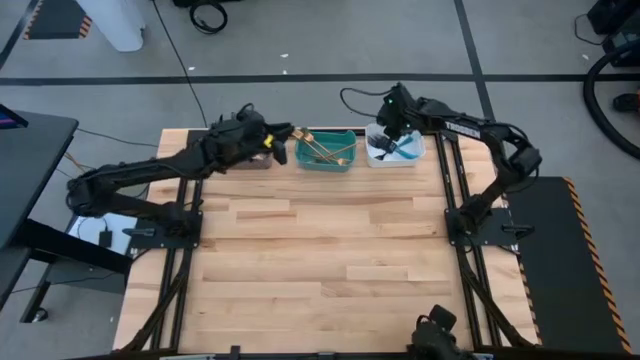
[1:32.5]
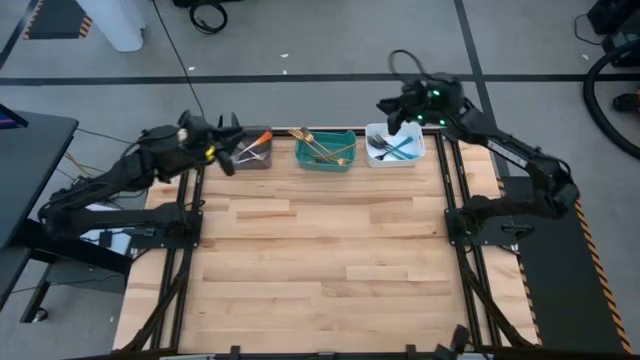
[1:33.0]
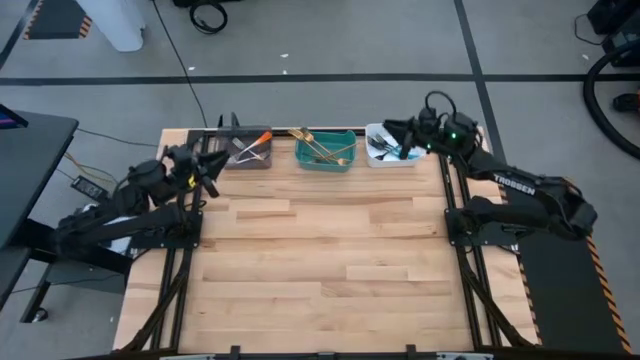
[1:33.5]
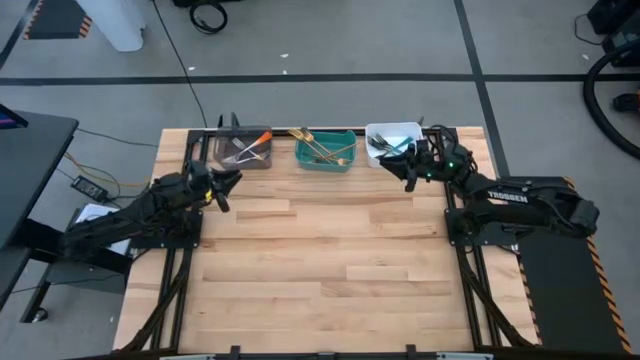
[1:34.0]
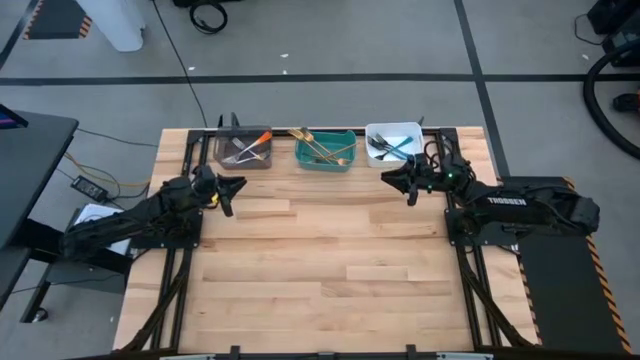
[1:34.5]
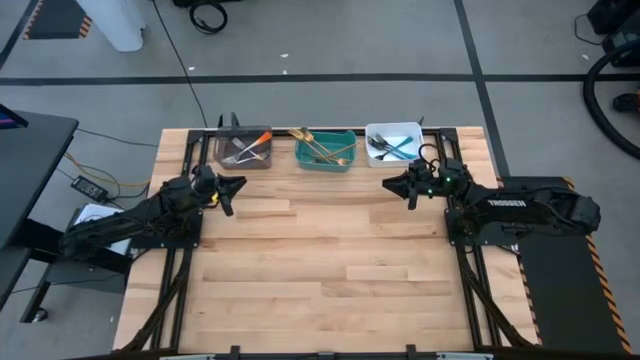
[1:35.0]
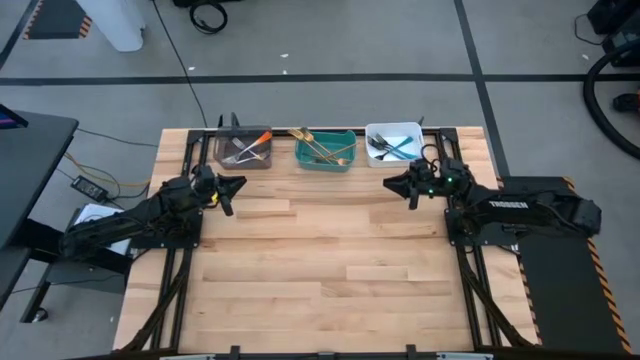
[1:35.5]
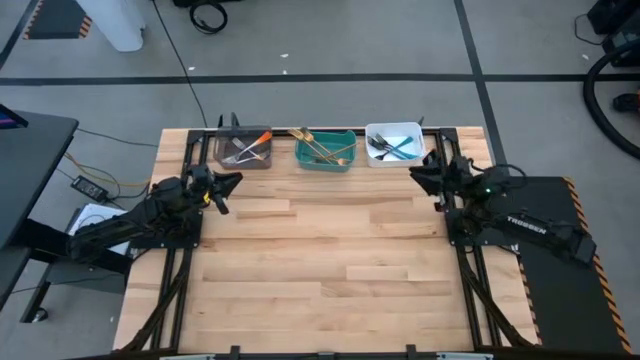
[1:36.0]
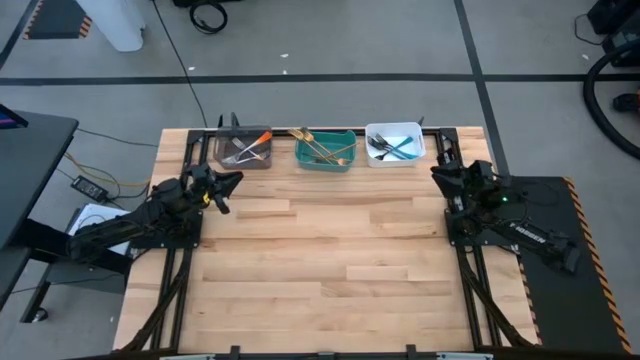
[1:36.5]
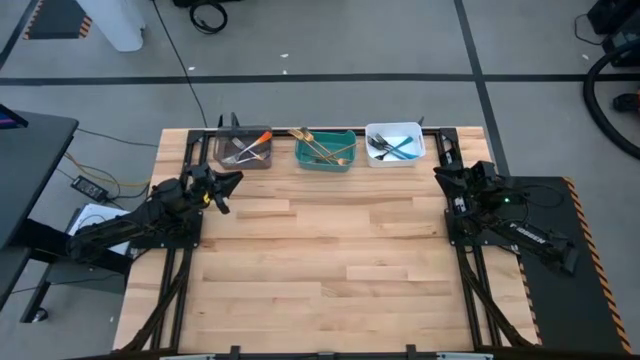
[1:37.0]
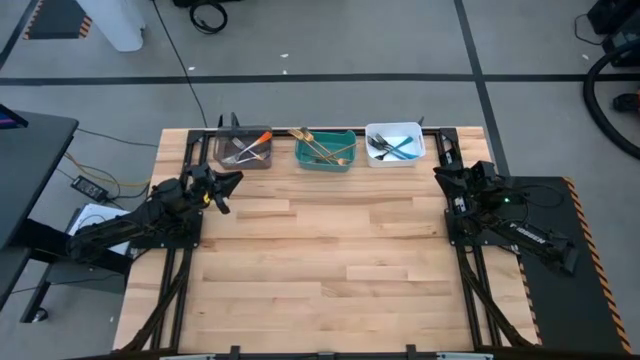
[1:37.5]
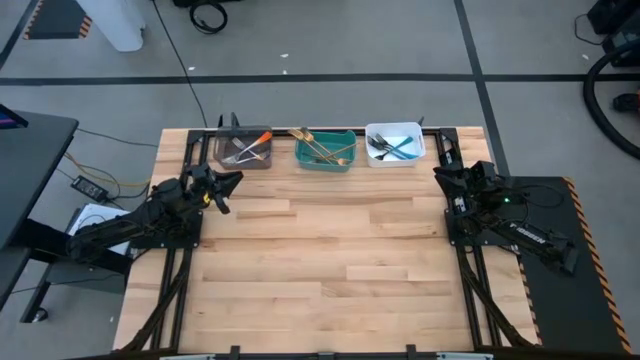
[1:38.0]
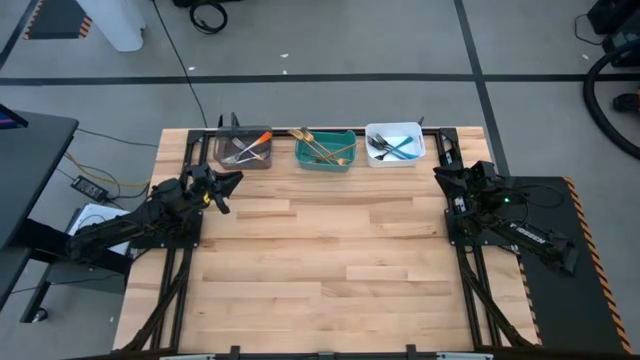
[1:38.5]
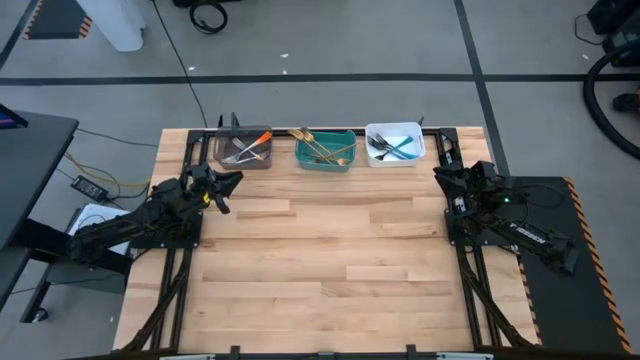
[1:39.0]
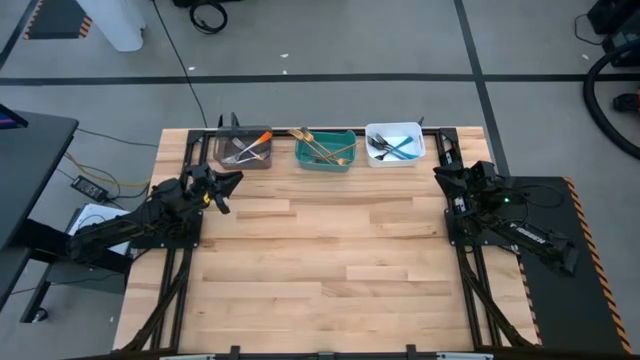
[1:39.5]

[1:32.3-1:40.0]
Task: Sort silverware by color (type)
Return to Home Position

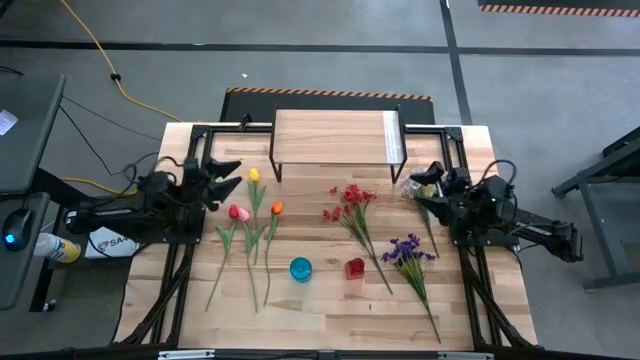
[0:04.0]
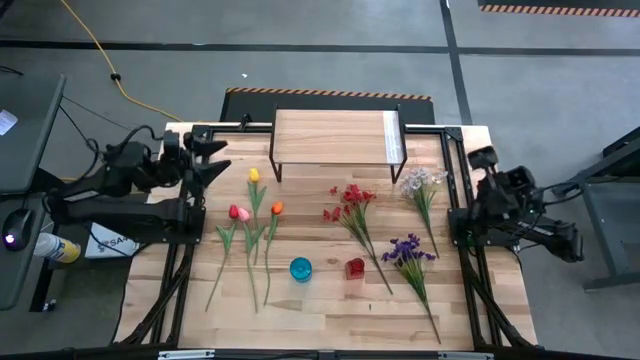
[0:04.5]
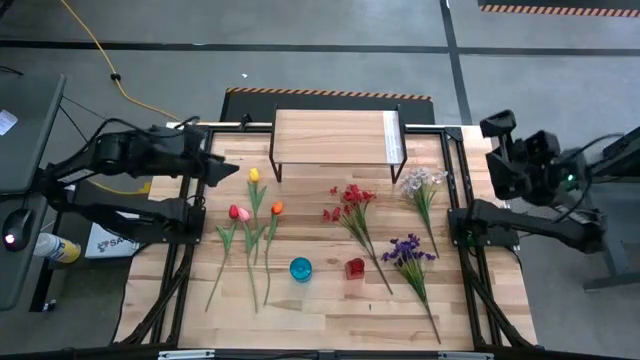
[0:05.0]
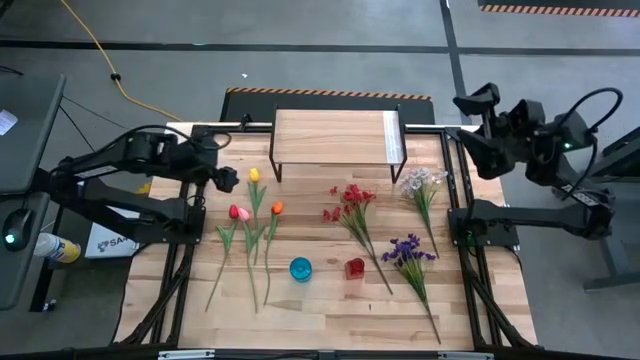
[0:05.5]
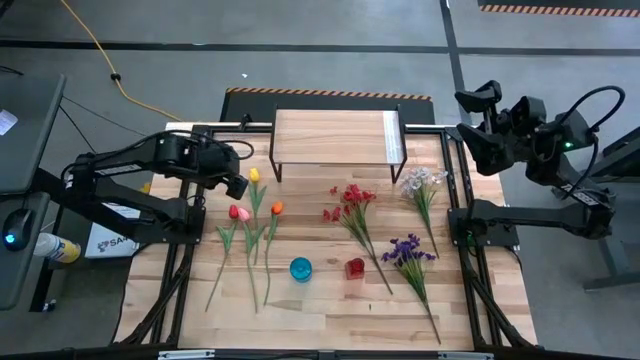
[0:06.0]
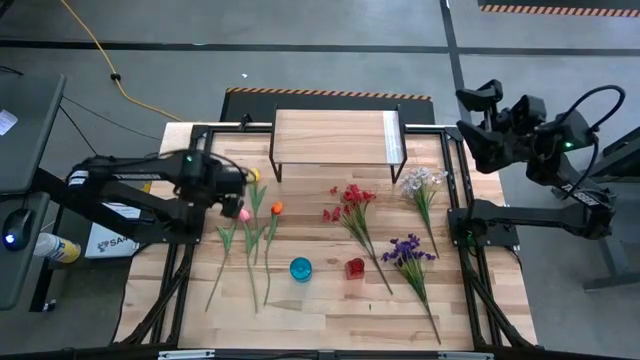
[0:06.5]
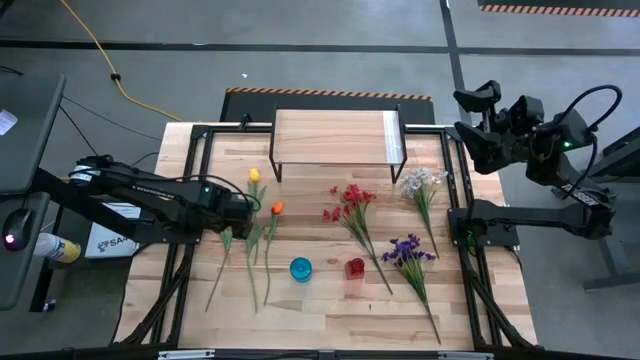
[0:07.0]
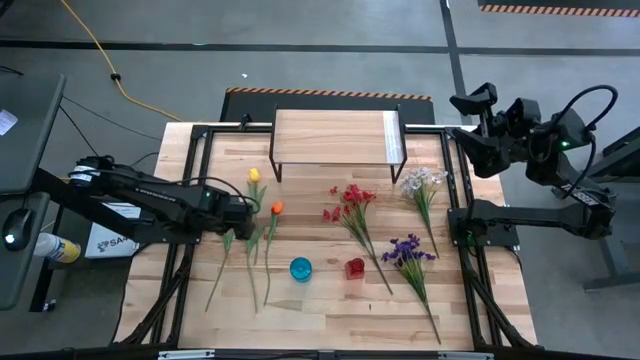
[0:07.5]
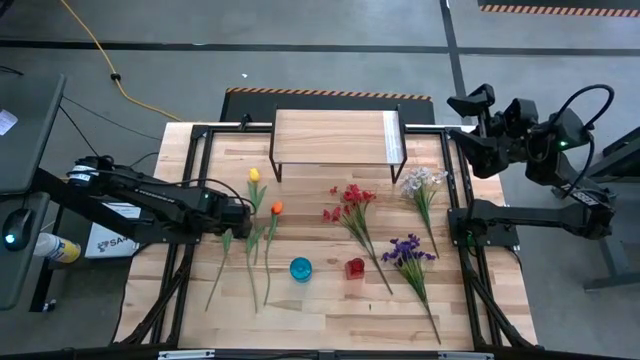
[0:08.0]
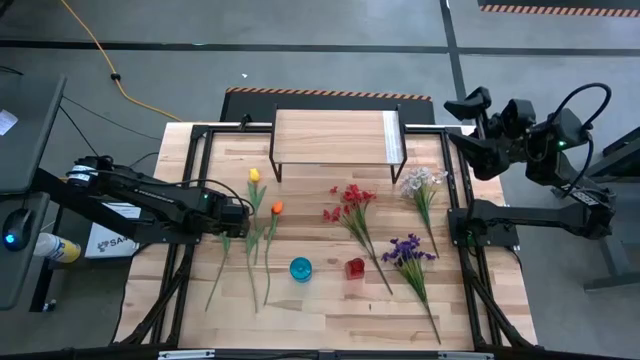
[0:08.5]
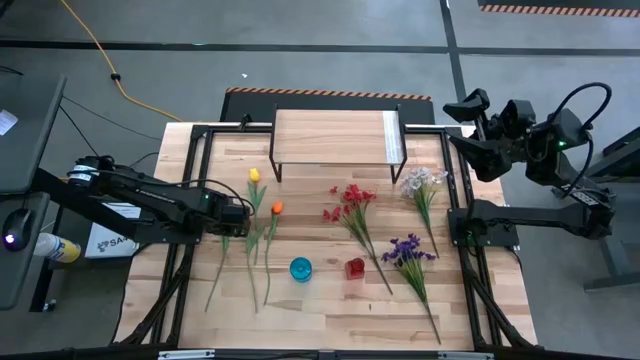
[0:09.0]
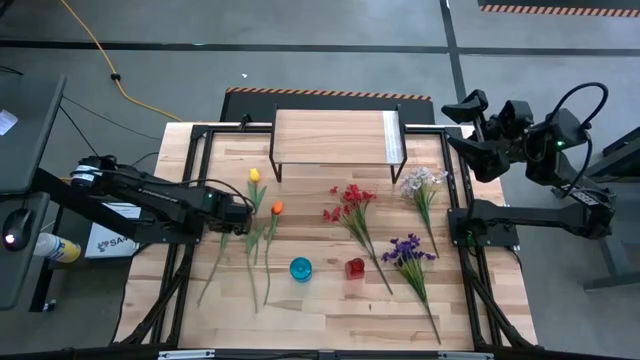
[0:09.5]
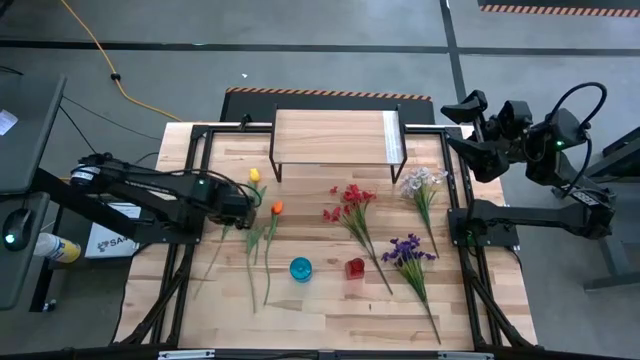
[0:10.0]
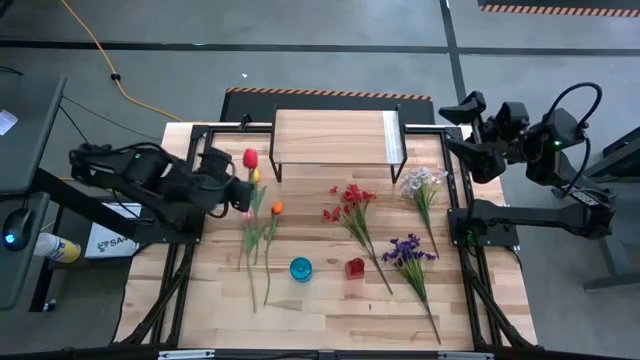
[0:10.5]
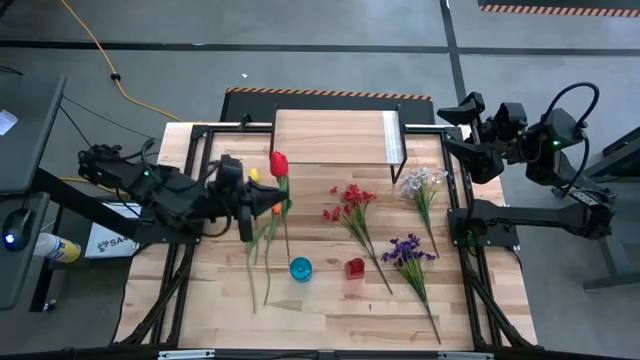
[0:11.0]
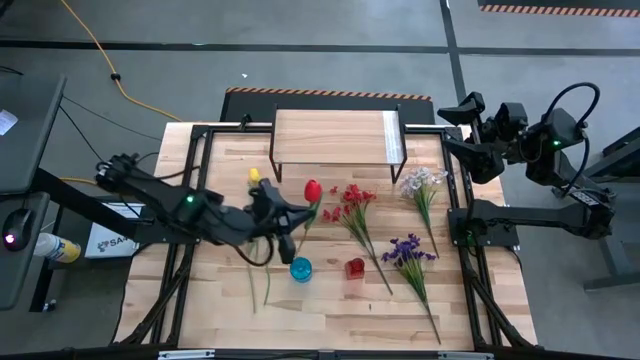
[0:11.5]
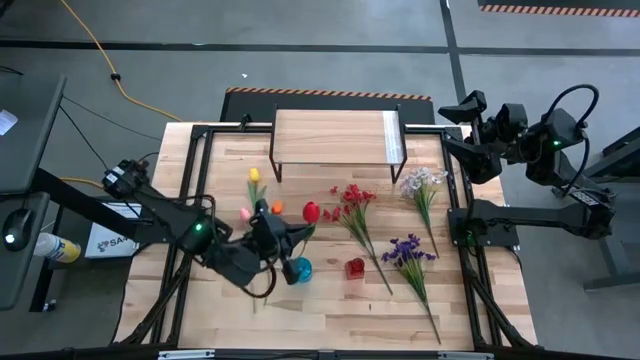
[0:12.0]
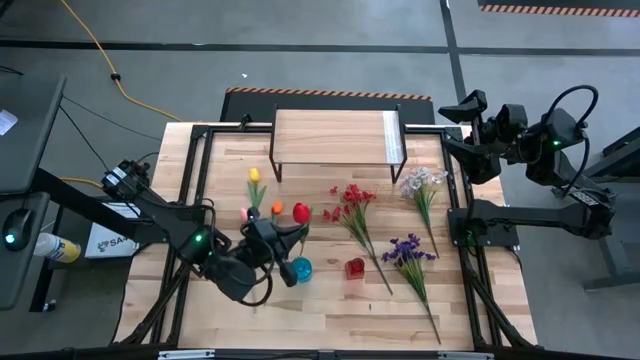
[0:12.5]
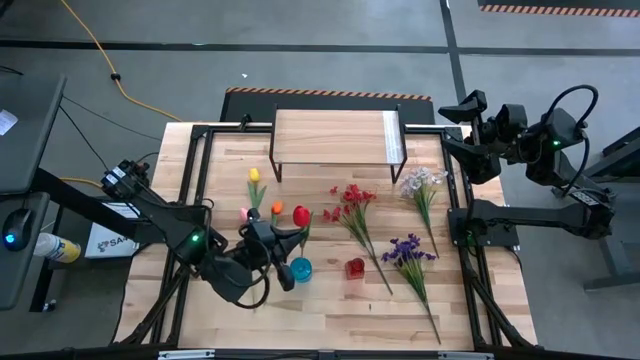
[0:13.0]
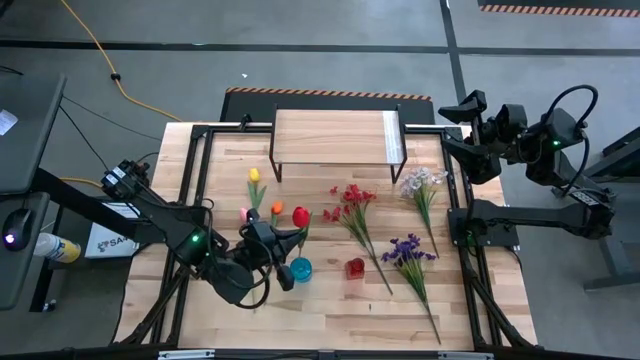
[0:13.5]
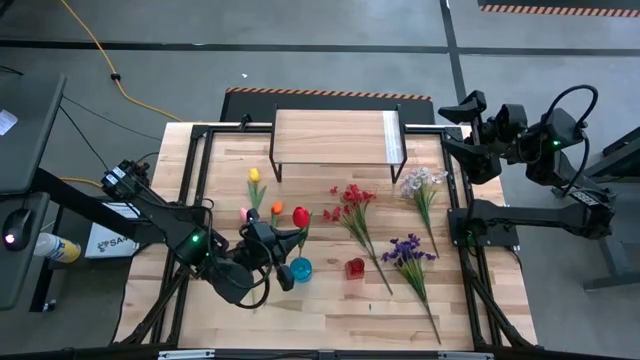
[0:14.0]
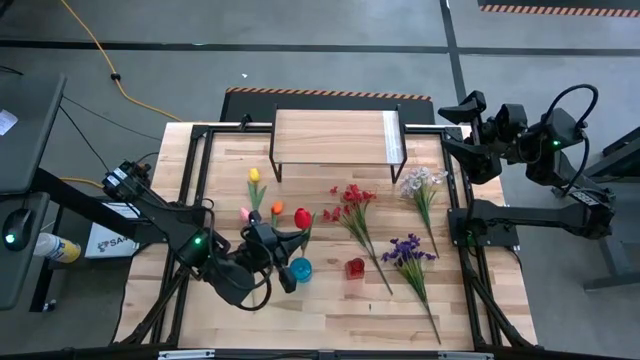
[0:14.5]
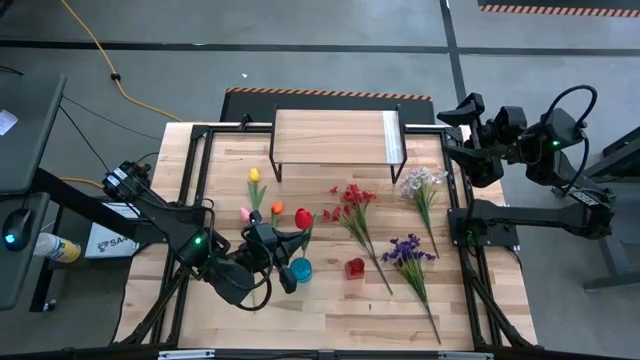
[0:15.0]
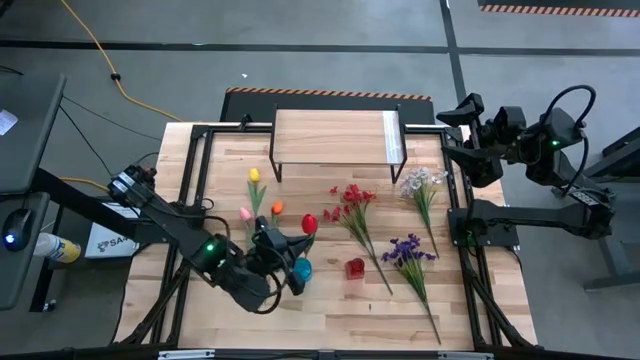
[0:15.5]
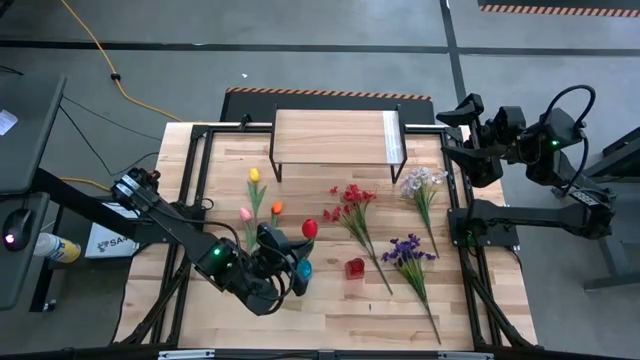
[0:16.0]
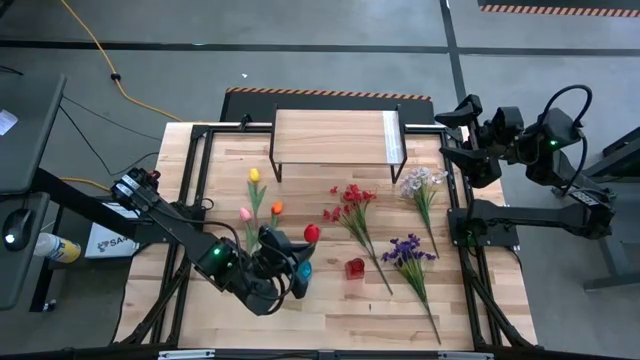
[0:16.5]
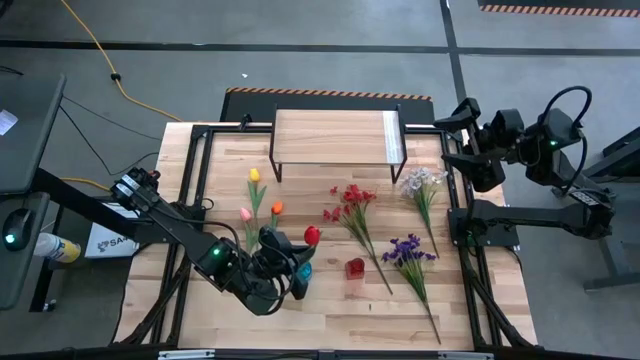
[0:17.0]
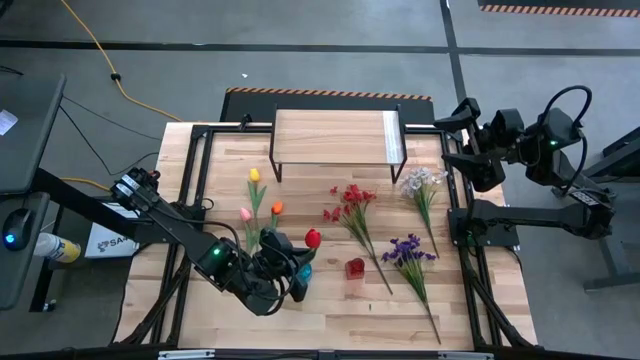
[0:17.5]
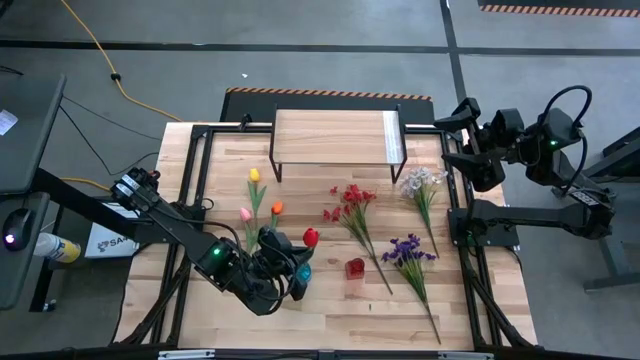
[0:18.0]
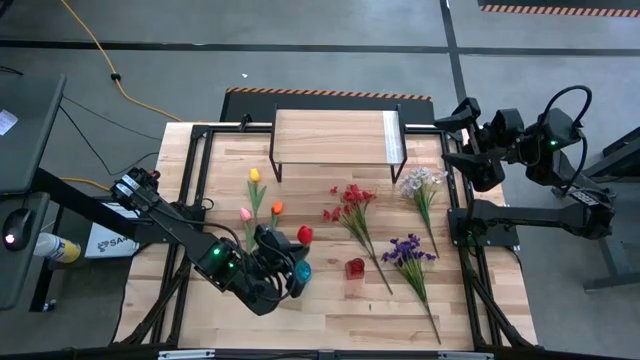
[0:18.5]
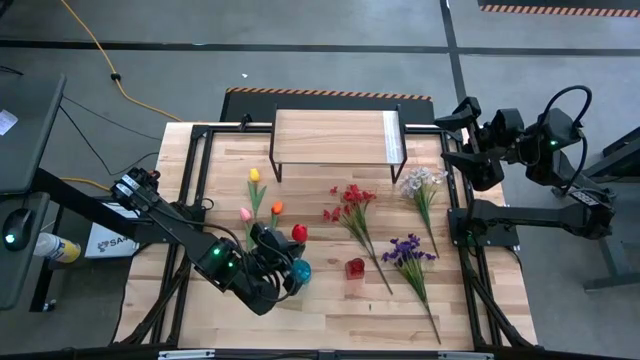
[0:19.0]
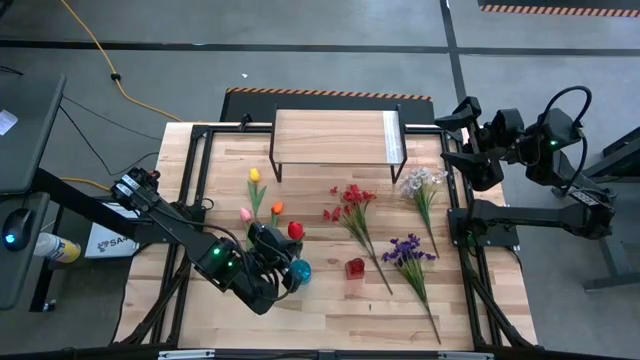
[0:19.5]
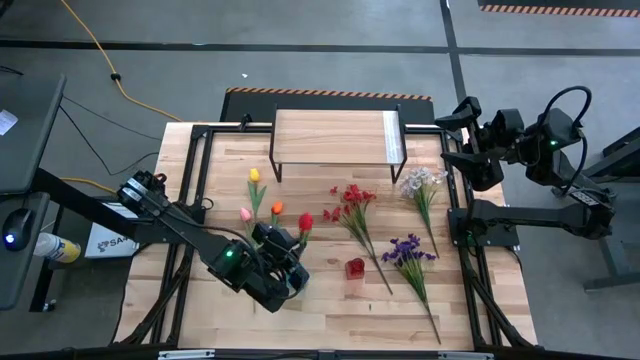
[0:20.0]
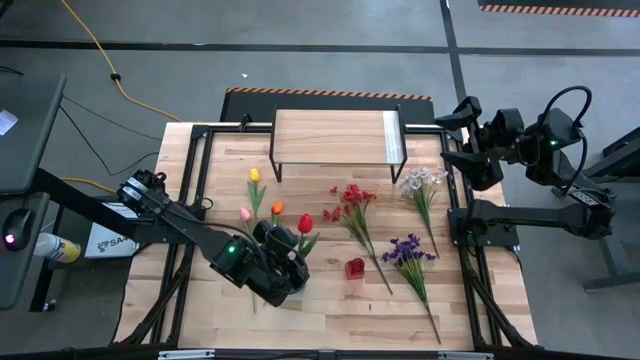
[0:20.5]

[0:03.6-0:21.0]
Task: Pick and place flowers into a vace then onto a shelf
Put the red tulip into the blue transparent vase
